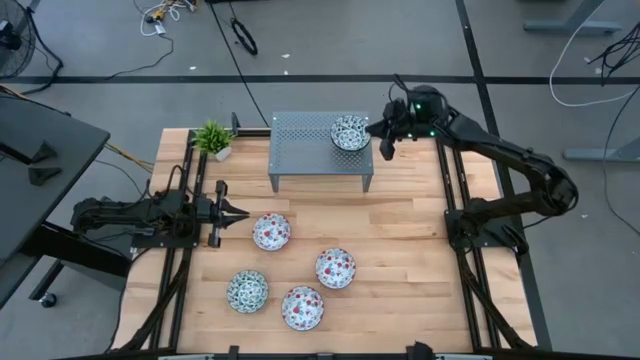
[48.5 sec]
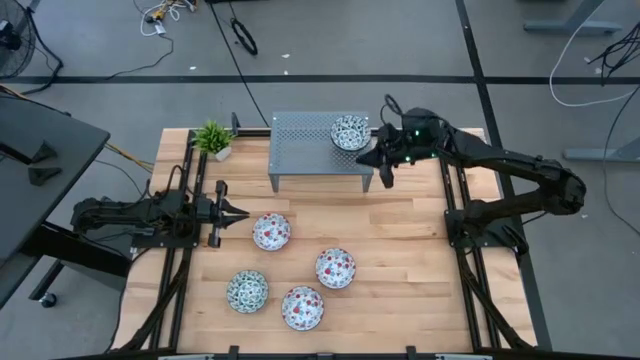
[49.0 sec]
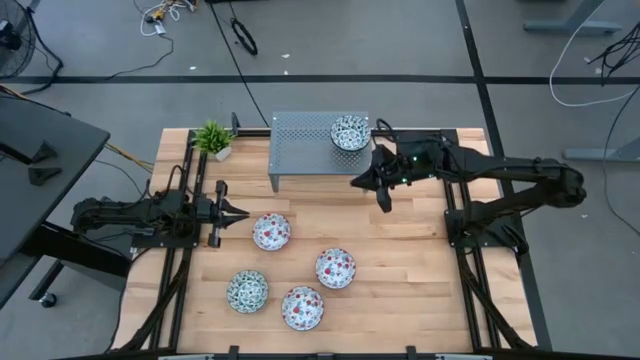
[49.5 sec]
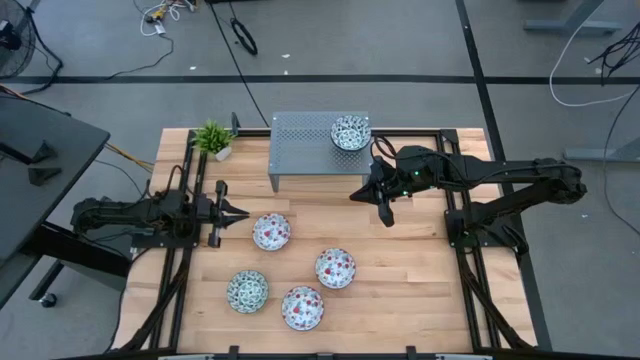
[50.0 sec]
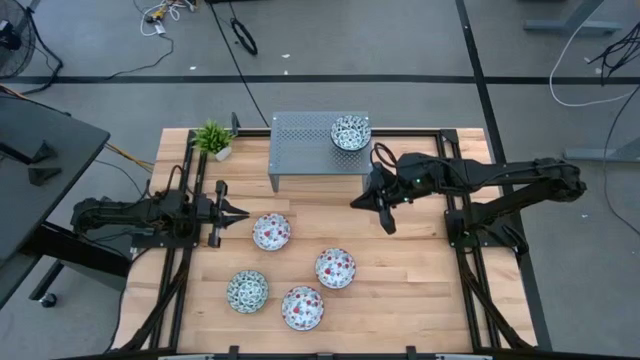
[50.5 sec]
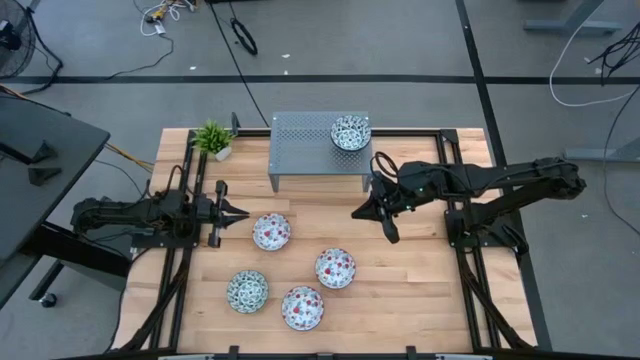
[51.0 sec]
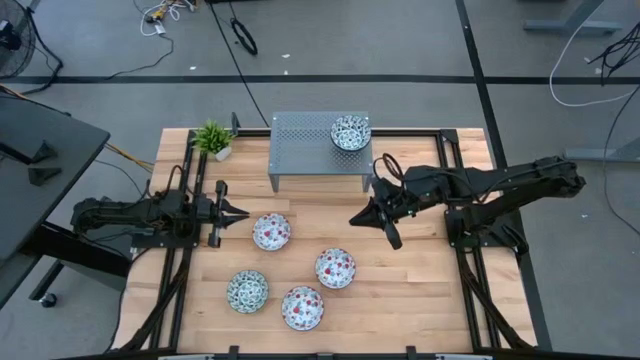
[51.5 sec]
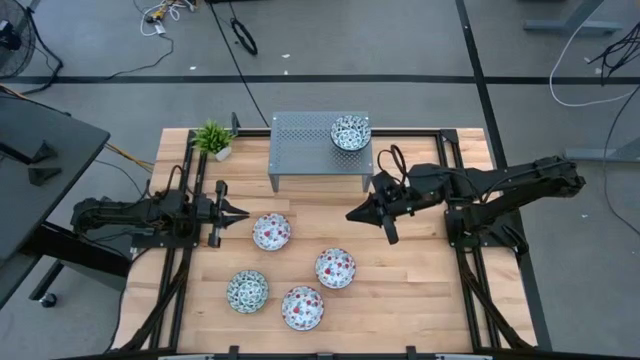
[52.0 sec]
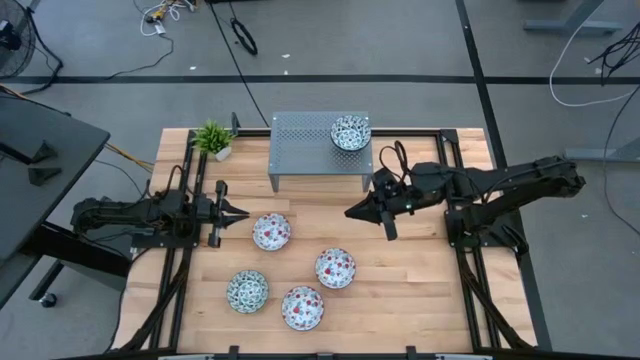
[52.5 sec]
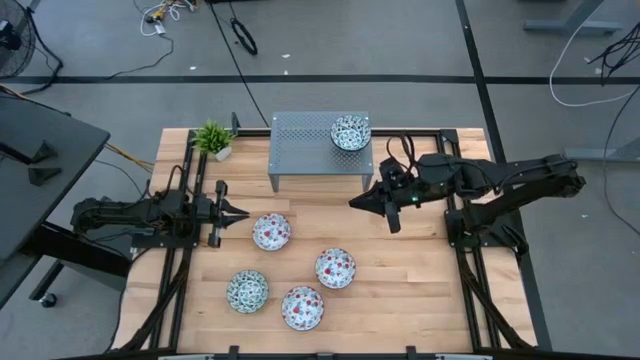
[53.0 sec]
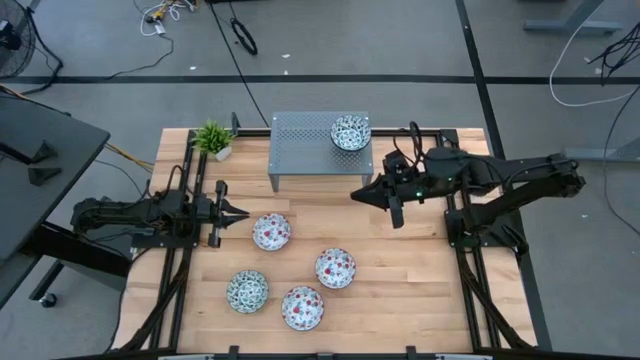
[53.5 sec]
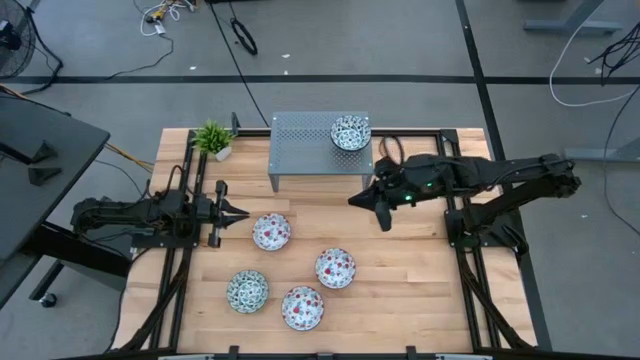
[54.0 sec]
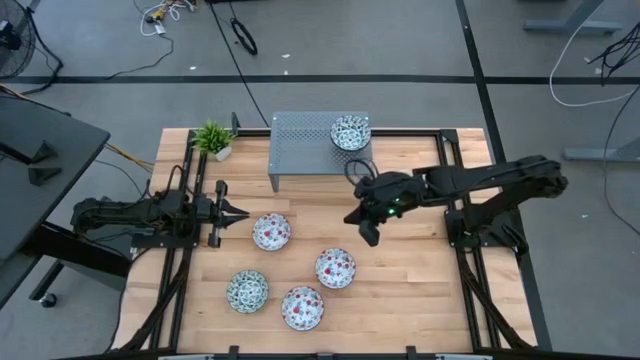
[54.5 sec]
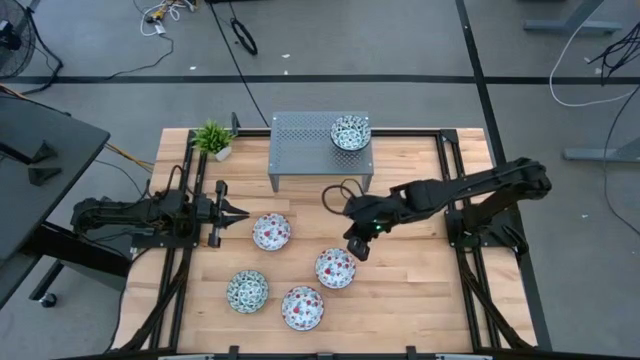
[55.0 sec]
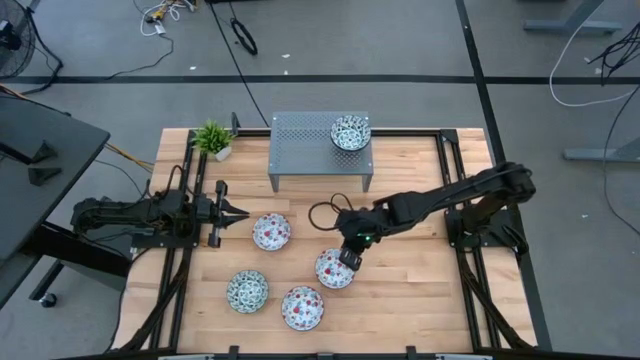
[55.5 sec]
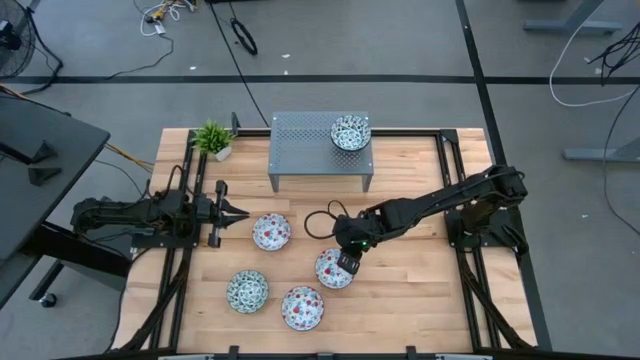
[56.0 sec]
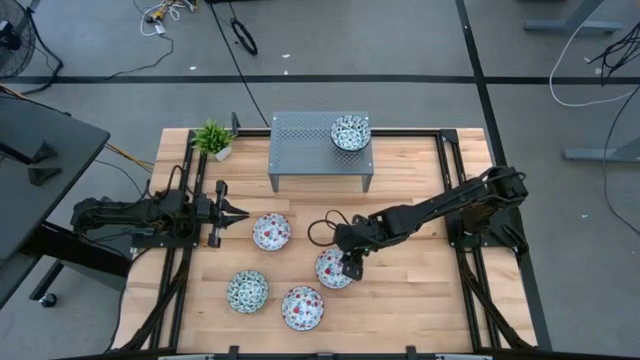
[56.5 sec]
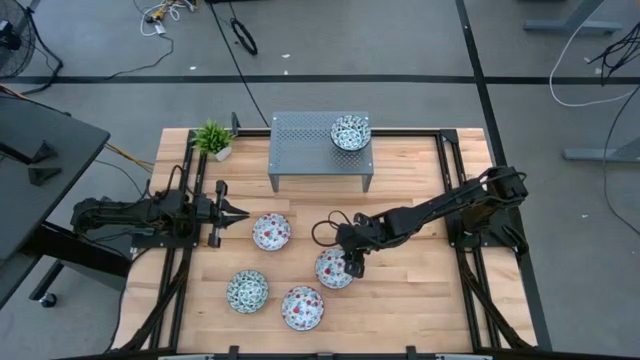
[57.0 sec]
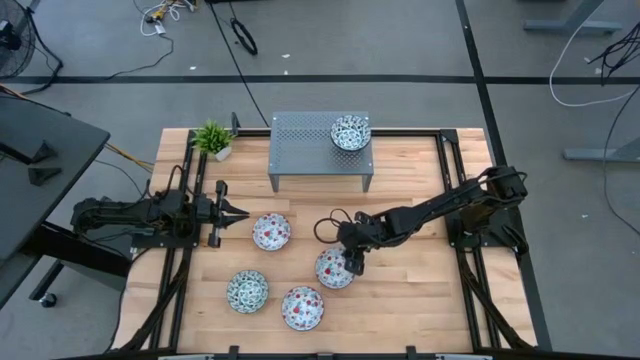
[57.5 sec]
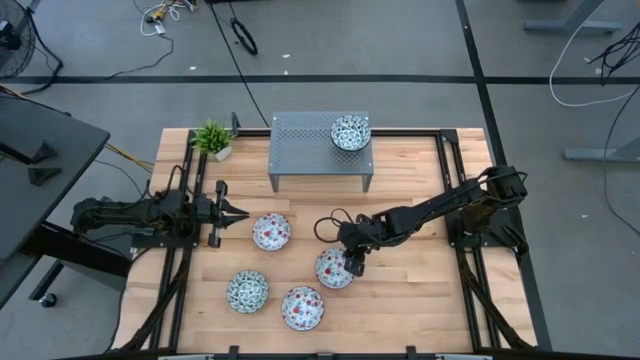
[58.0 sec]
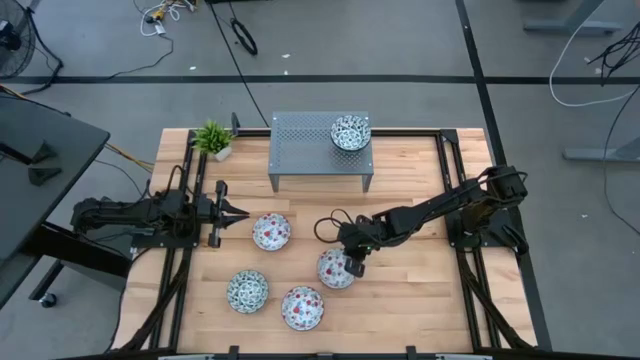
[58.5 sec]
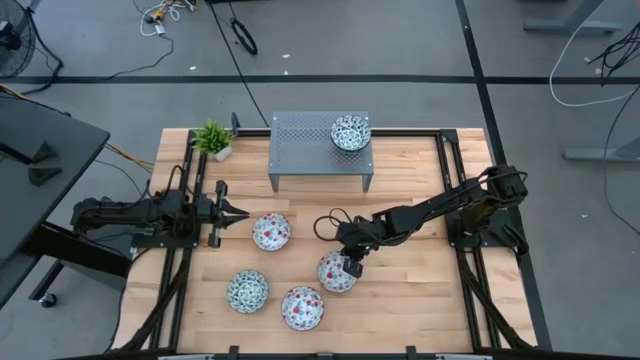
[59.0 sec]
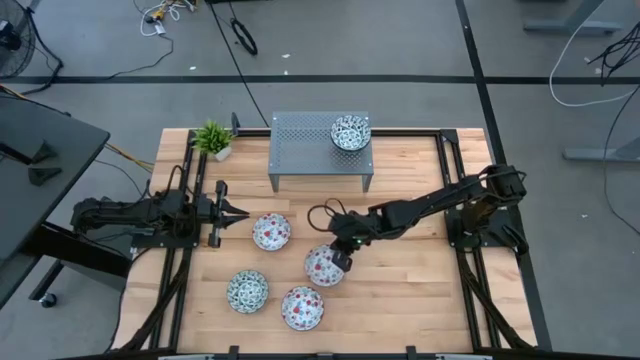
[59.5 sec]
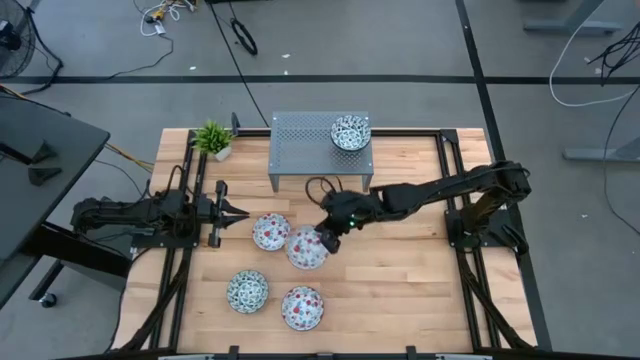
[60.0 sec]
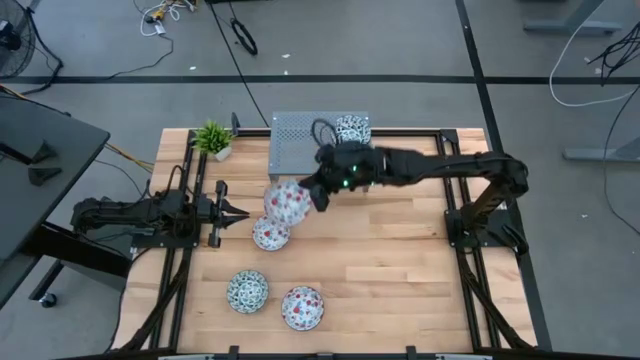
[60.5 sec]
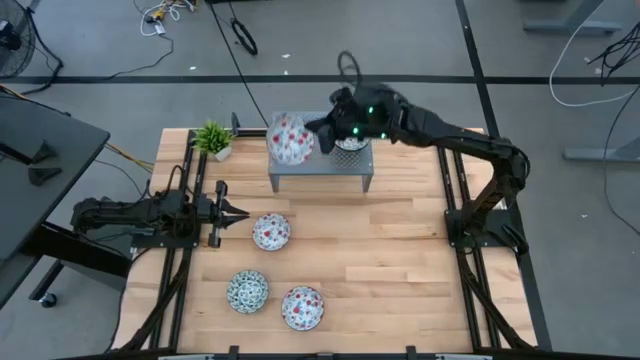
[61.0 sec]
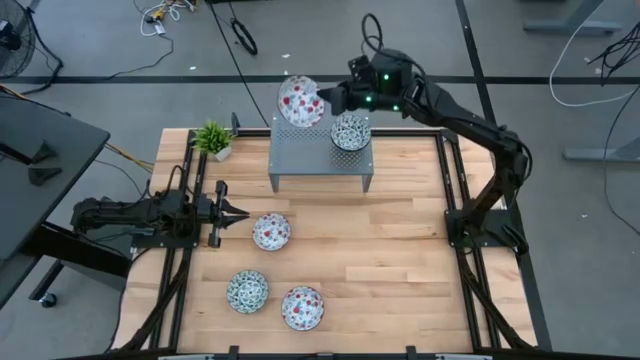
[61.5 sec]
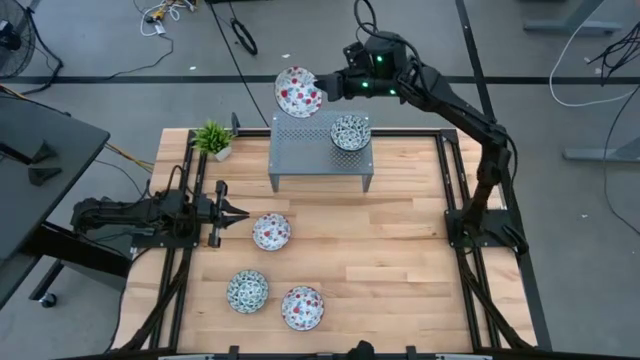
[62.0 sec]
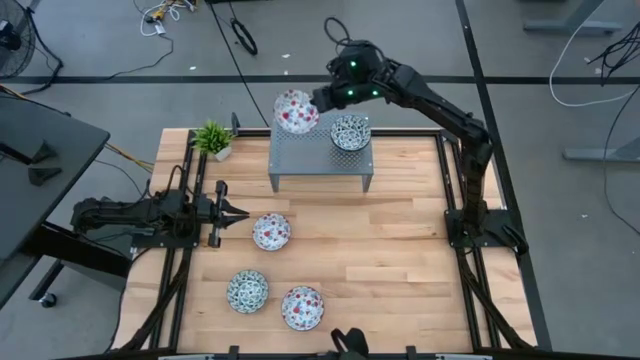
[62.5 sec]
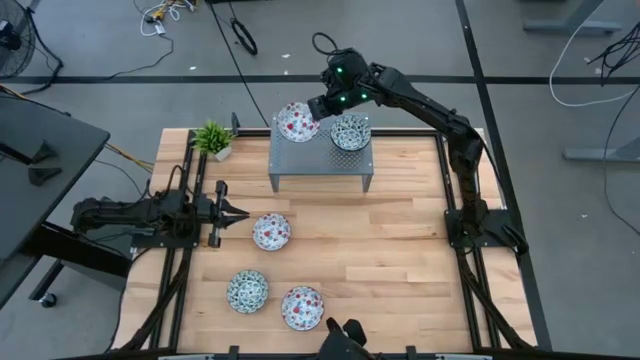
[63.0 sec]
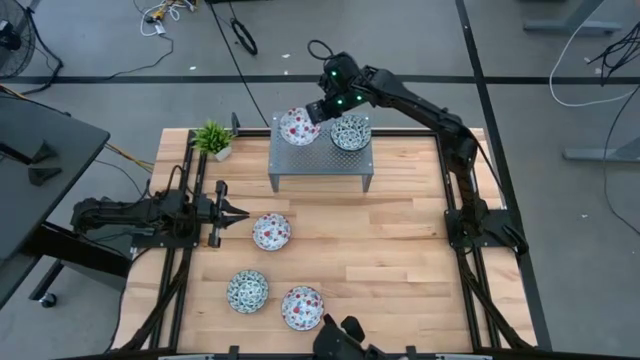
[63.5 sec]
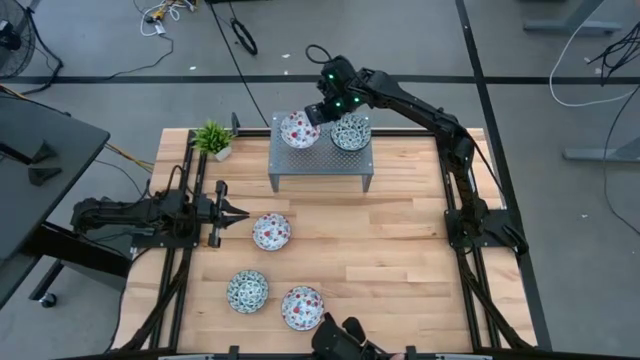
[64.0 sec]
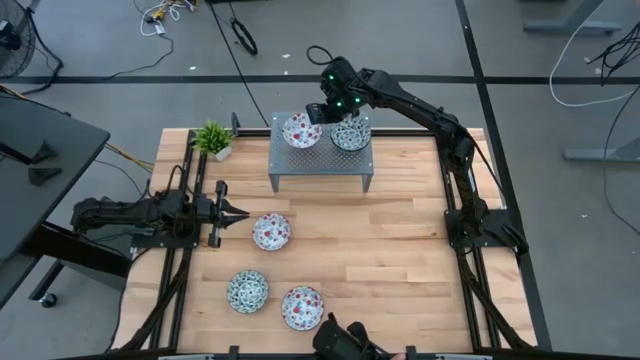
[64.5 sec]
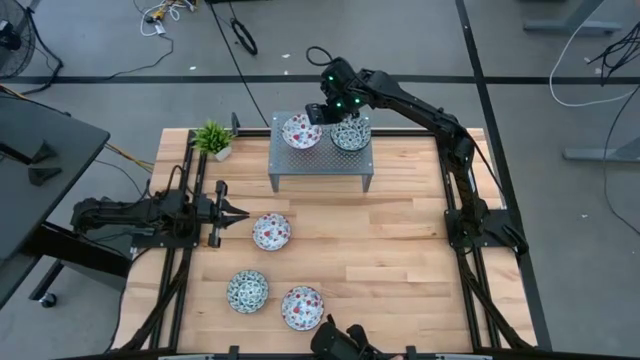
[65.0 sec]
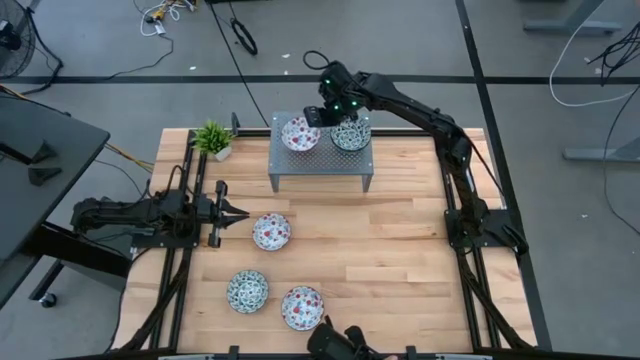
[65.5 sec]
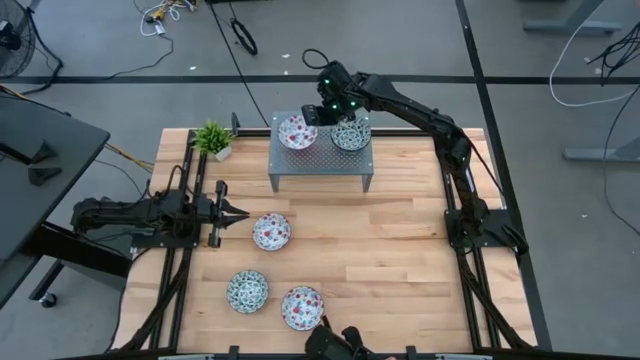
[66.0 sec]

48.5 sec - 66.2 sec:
Task: Pick & Place Mini bowls
Put the right red and white patterned bowl on the shelf
